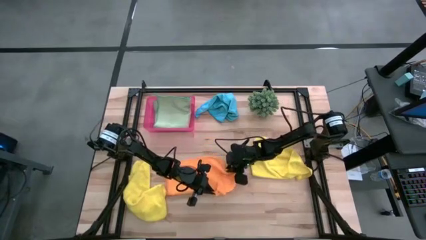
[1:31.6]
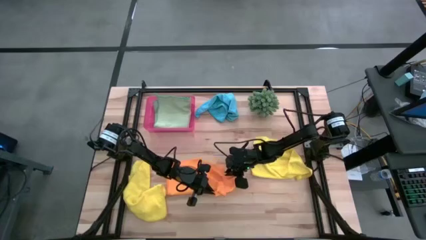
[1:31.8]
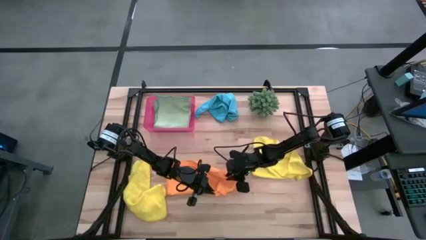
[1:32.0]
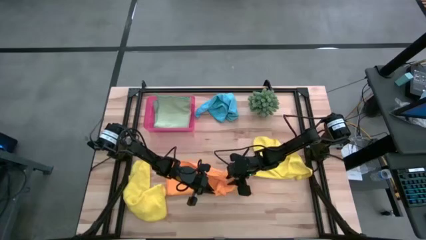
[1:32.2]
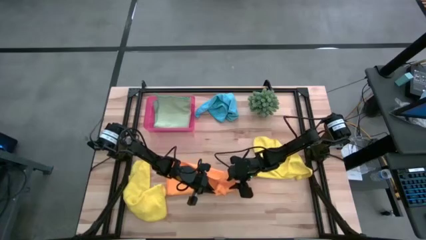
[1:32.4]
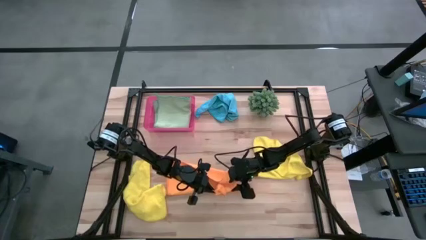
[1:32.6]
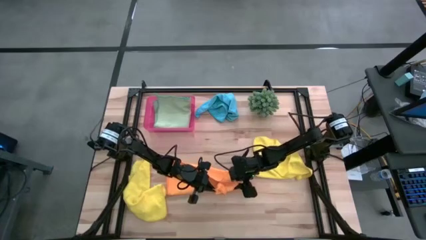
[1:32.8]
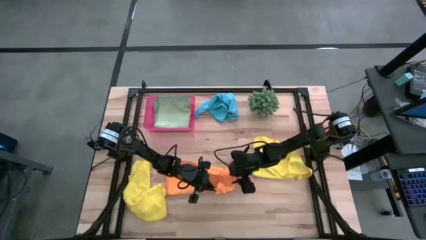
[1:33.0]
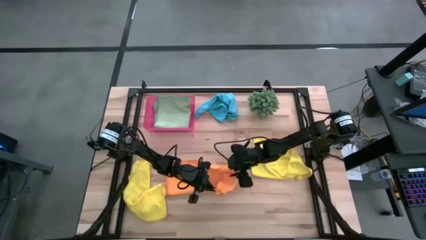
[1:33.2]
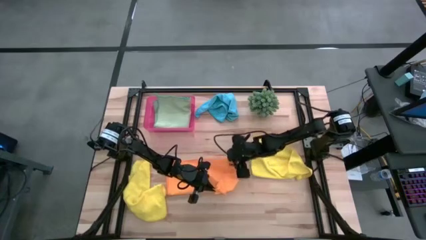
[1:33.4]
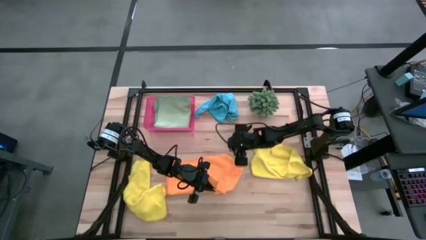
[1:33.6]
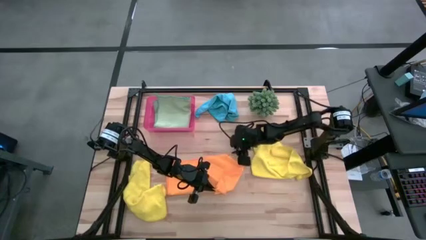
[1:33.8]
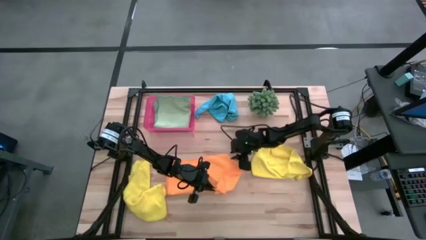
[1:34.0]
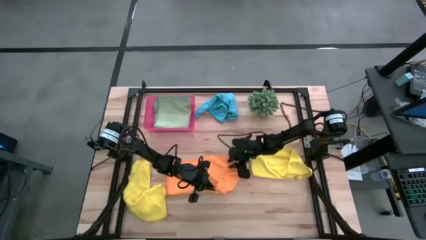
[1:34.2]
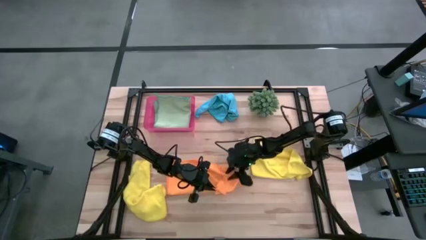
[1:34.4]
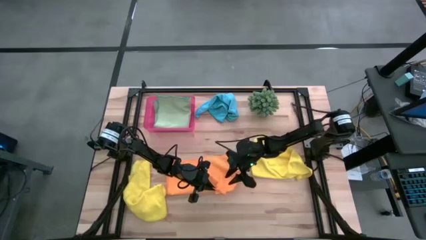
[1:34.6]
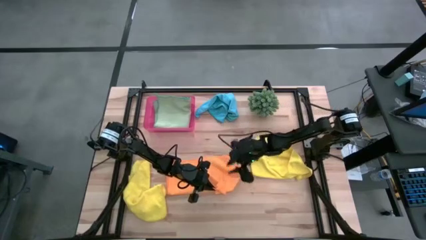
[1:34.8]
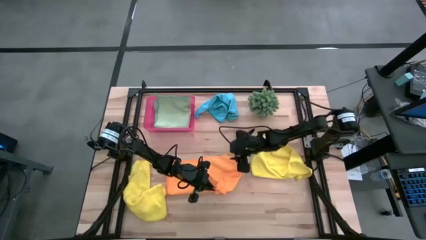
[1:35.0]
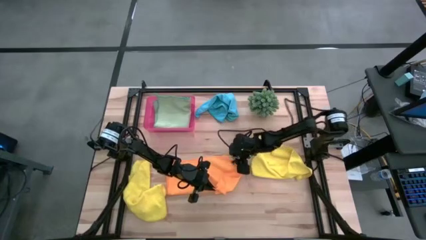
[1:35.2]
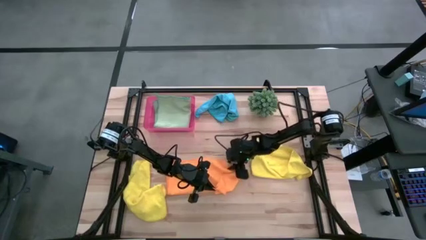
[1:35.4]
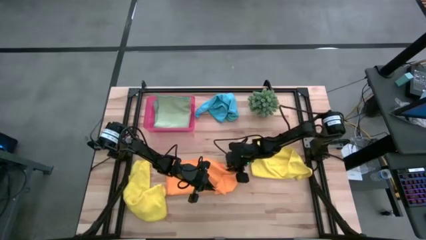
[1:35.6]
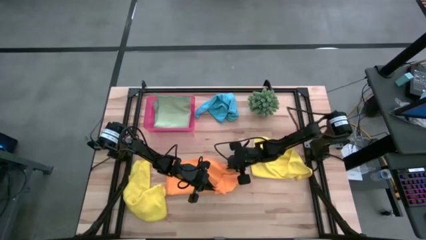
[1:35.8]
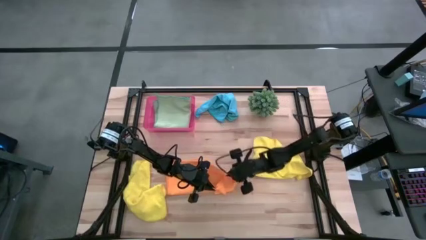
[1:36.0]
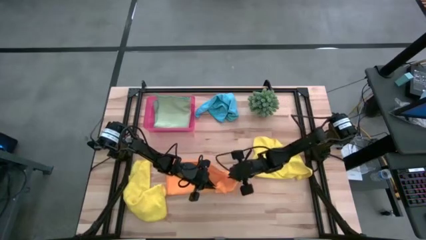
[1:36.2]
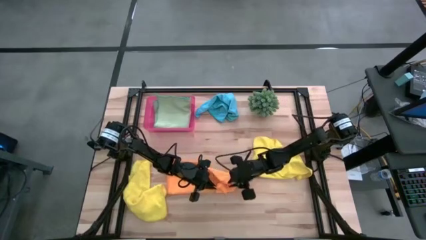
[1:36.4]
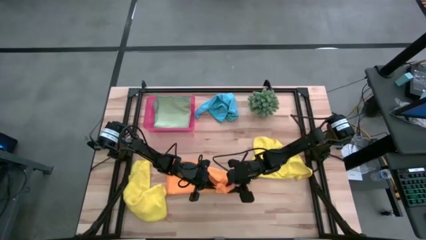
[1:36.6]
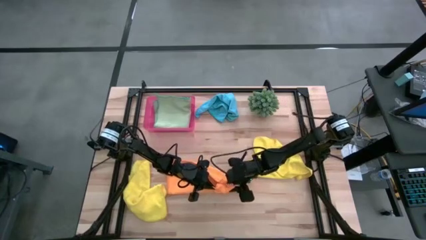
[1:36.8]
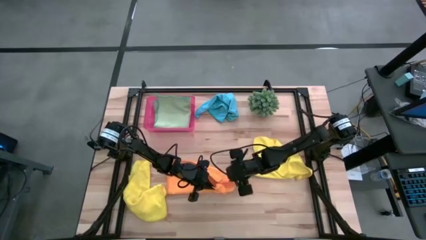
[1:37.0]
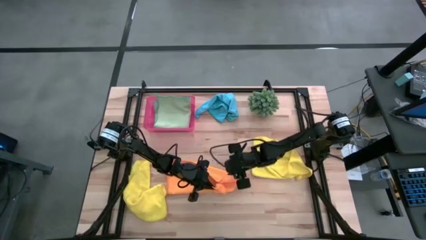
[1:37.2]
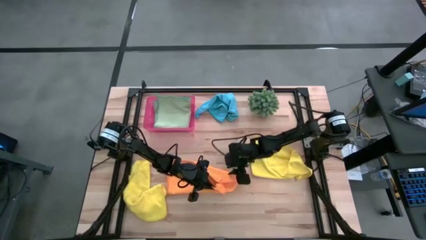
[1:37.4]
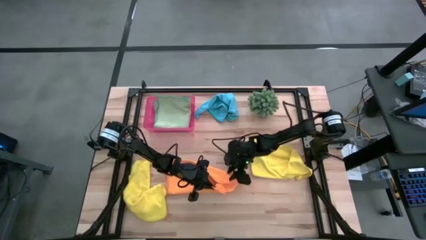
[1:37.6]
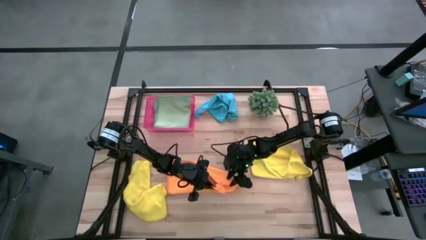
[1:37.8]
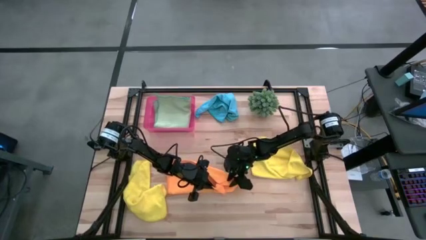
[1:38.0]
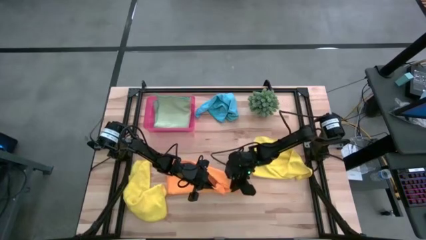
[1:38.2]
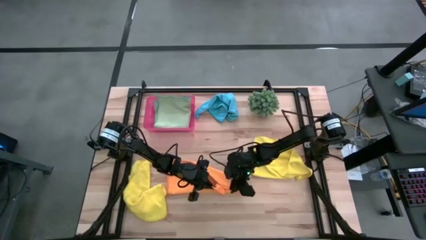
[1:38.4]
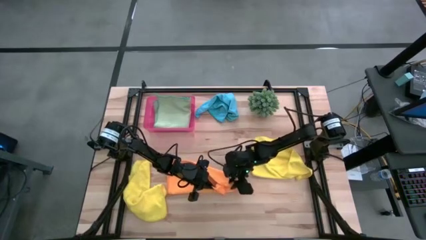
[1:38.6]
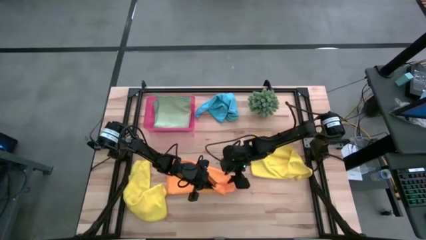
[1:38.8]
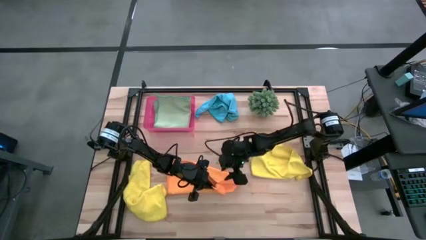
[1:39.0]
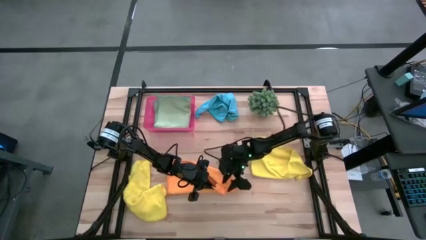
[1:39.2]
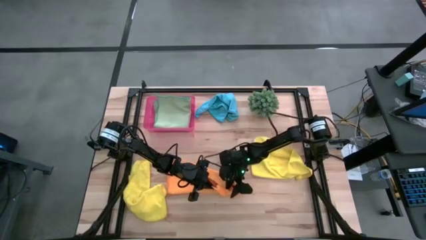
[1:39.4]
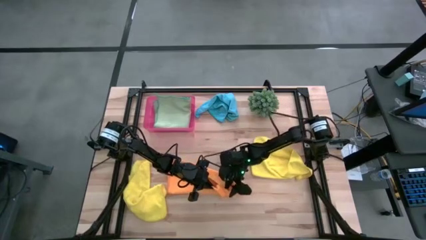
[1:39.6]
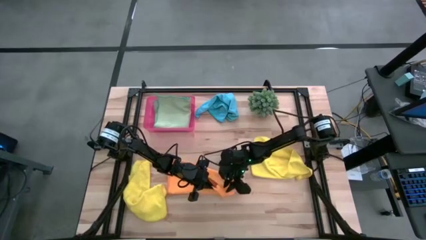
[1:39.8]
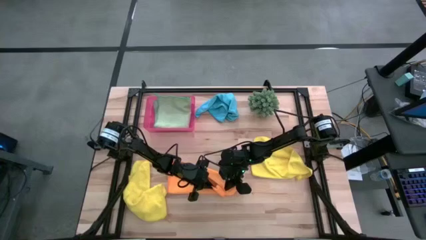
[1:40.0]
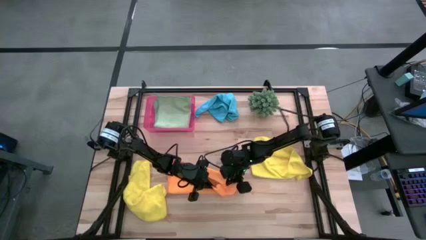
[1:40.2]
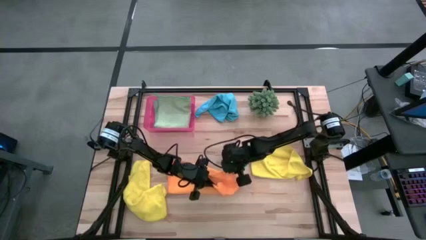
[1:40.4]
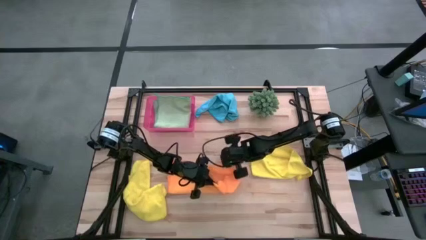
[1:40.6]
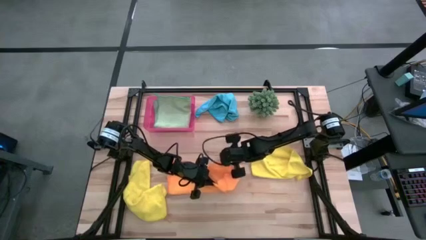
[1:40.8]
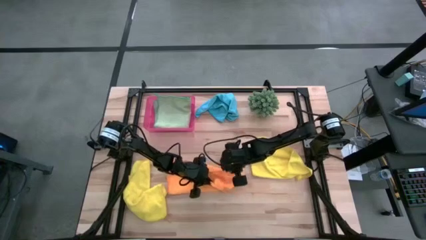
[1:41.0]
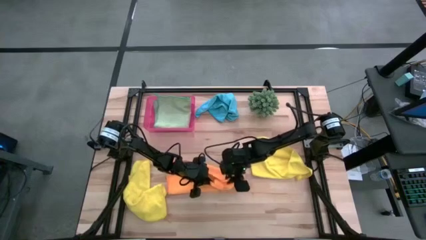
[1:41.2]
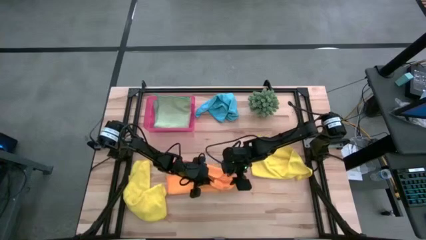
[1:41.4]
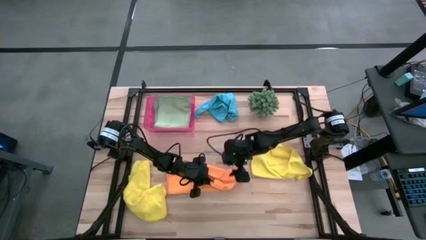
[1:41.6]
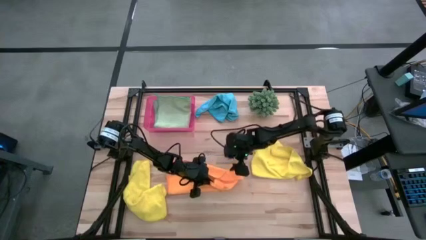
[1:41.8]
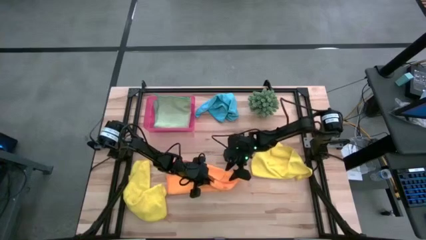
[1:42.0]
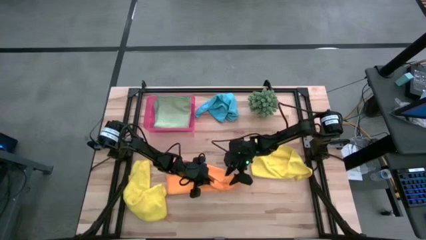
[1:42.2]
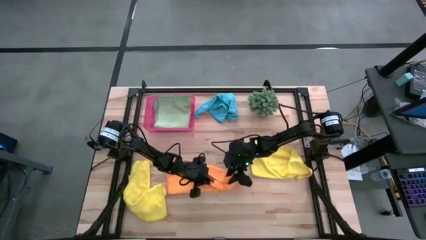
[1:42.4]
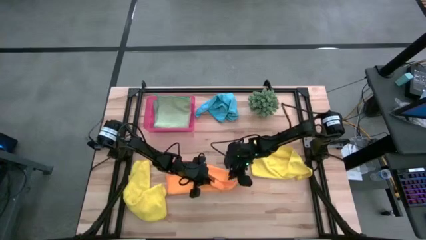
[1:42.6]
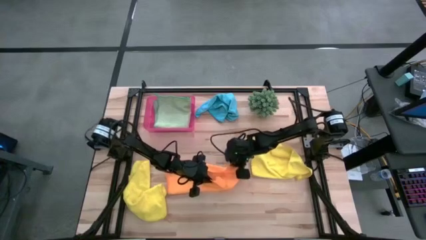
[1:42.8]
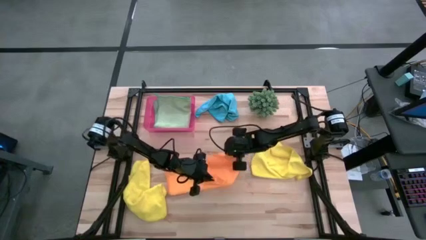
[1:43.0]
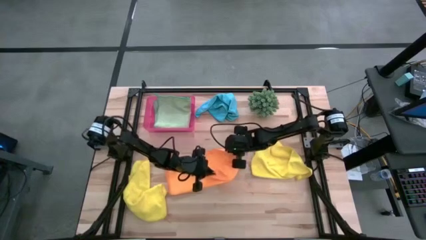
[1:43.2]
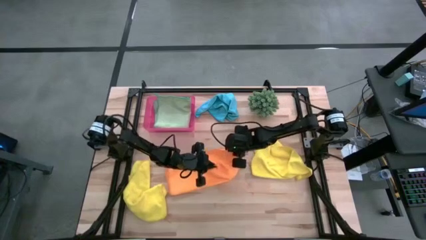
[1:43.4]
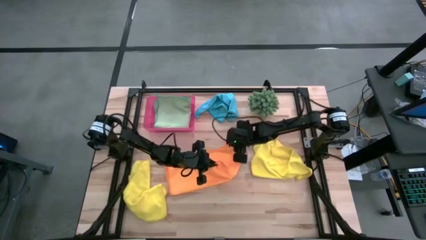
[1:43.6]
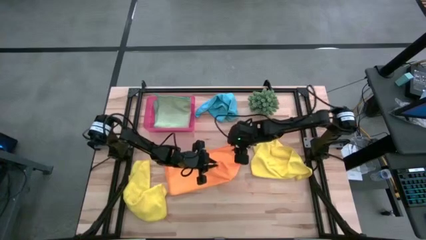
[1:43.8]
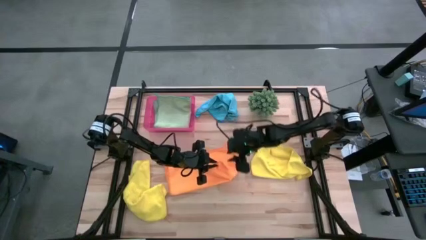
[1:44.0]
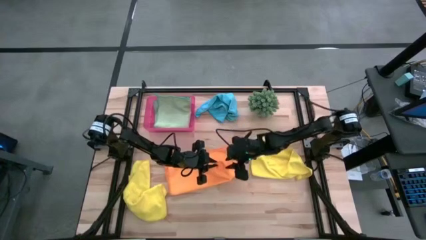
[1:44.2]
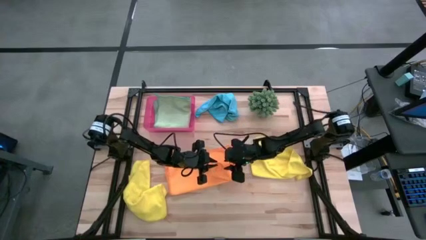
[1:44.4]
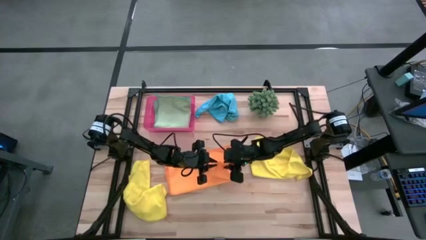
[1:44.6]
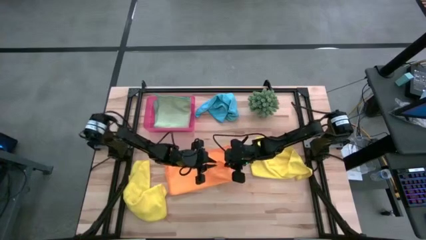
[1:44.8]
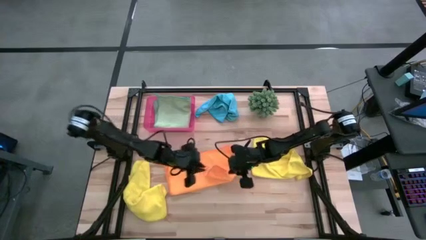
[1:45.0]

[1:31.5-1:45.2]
Task: Fold microfiber towels
Fold the orange towel
